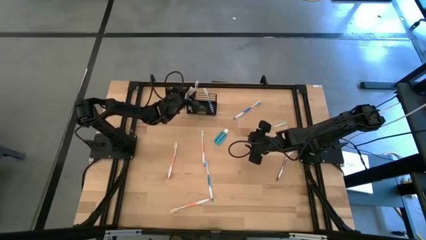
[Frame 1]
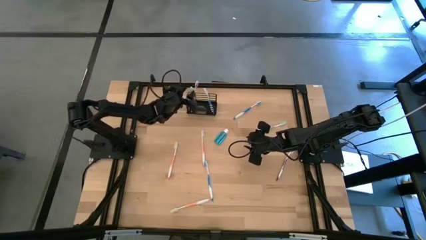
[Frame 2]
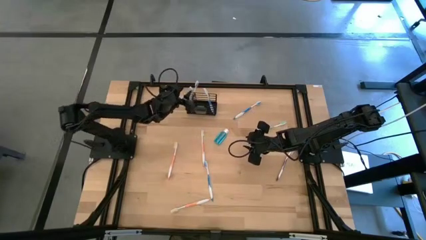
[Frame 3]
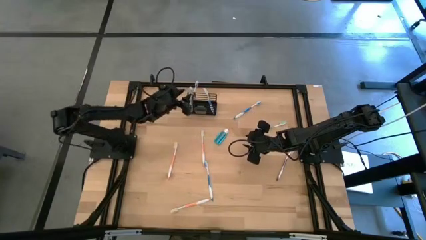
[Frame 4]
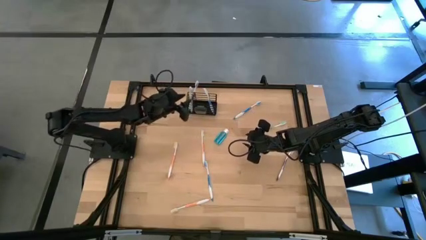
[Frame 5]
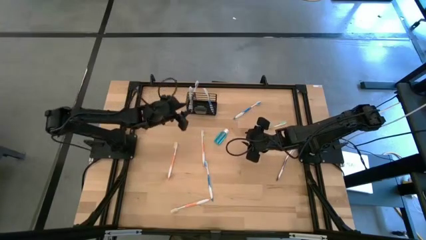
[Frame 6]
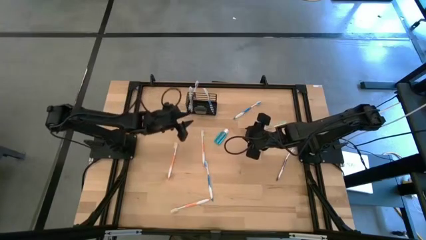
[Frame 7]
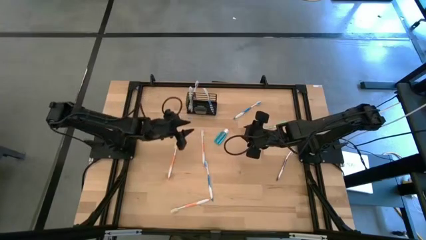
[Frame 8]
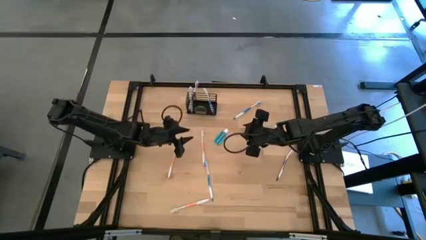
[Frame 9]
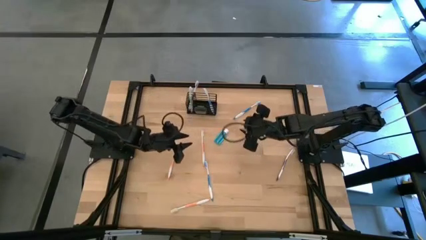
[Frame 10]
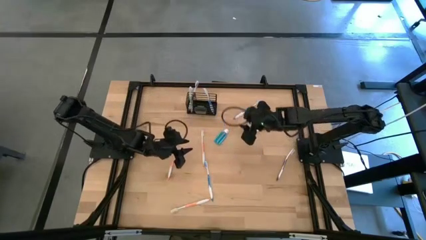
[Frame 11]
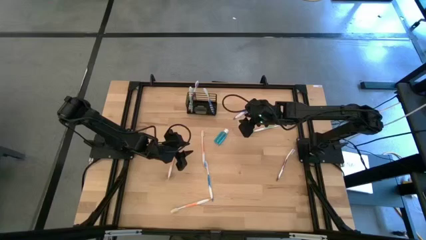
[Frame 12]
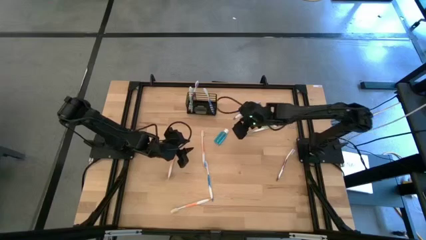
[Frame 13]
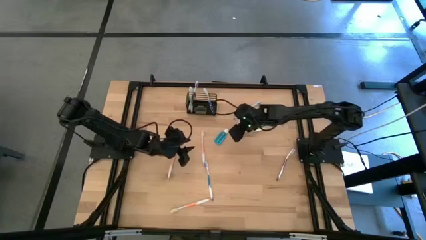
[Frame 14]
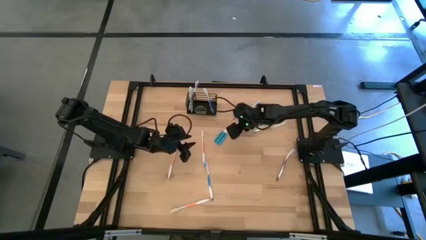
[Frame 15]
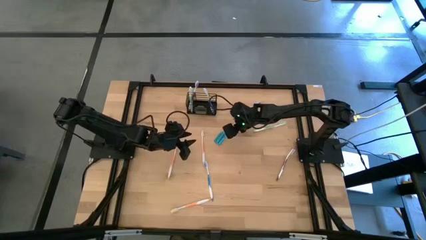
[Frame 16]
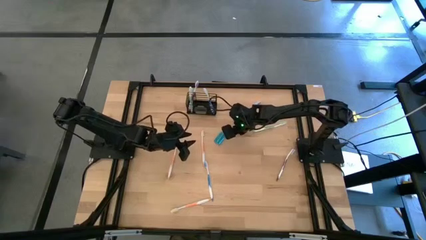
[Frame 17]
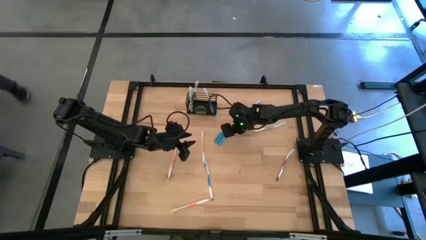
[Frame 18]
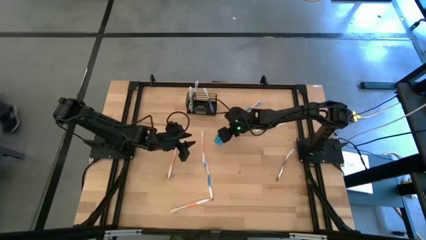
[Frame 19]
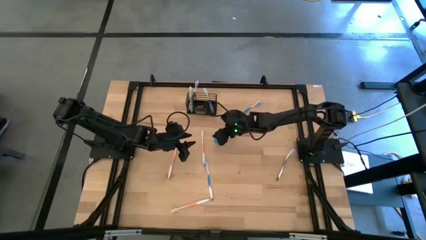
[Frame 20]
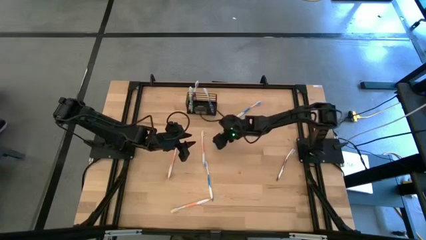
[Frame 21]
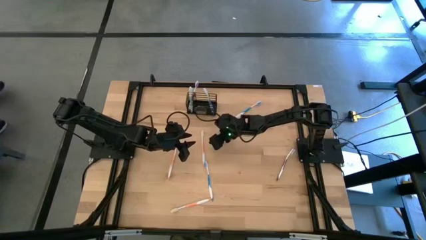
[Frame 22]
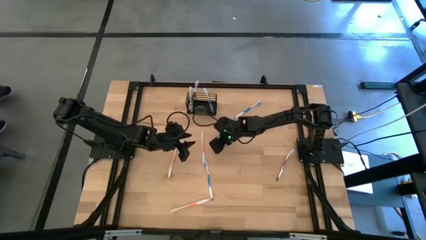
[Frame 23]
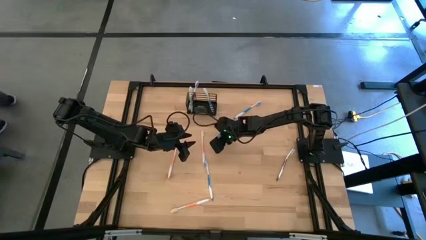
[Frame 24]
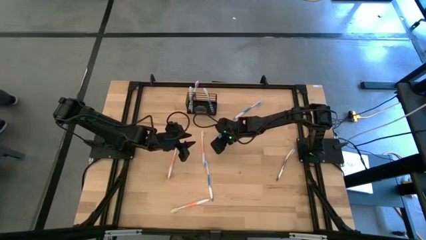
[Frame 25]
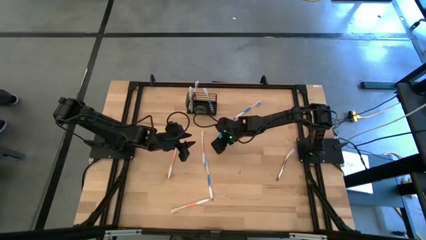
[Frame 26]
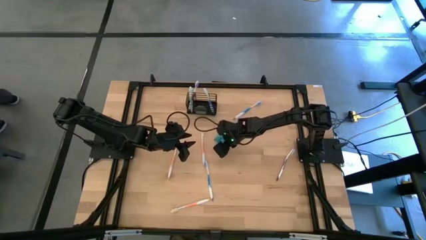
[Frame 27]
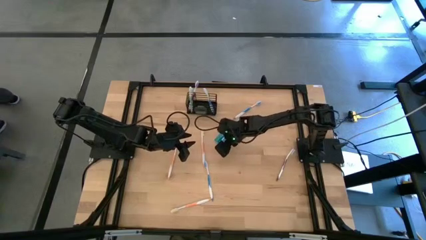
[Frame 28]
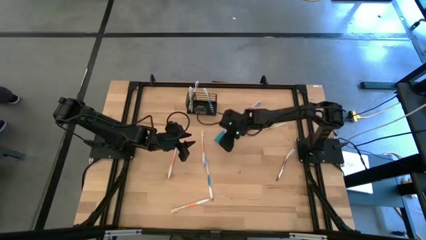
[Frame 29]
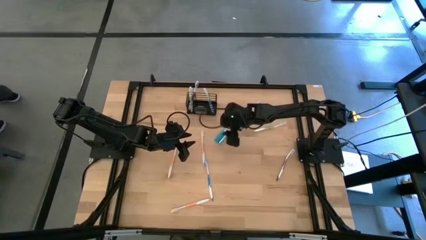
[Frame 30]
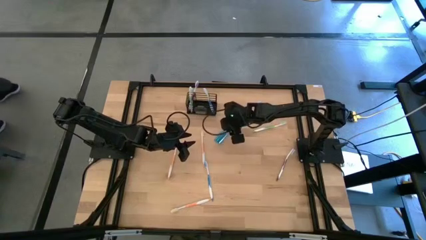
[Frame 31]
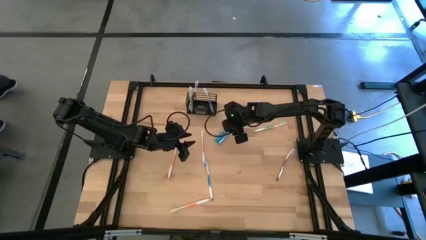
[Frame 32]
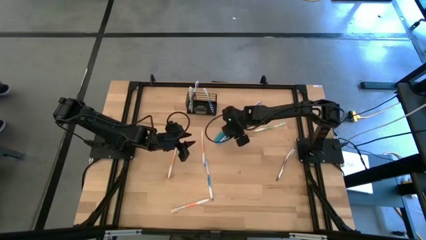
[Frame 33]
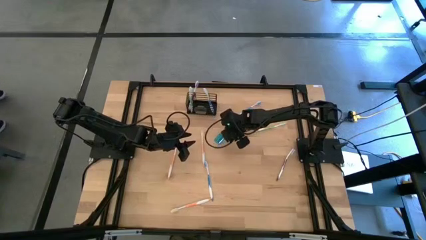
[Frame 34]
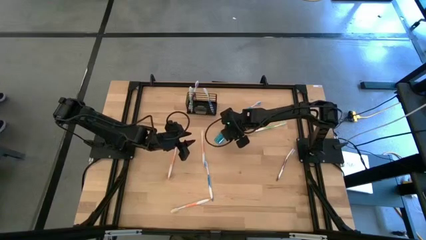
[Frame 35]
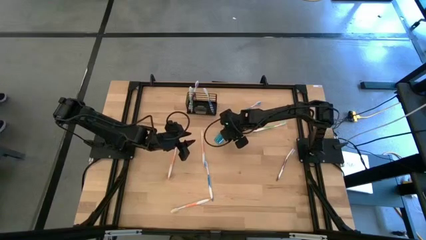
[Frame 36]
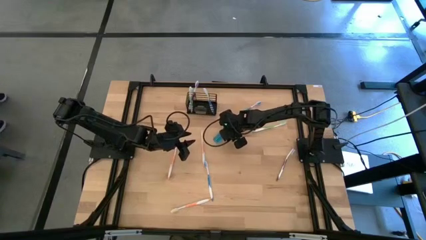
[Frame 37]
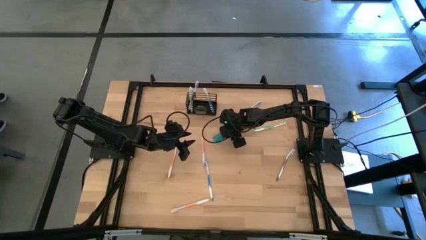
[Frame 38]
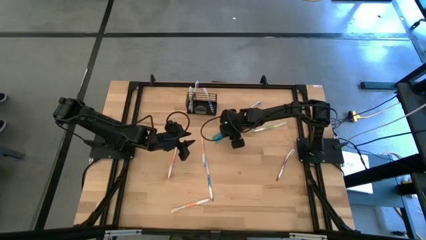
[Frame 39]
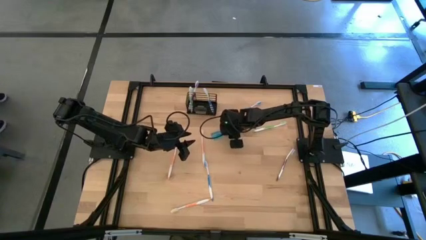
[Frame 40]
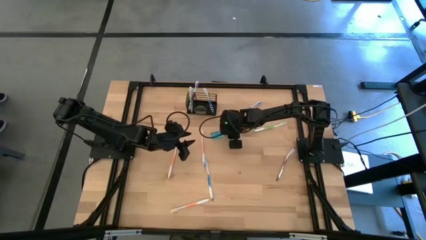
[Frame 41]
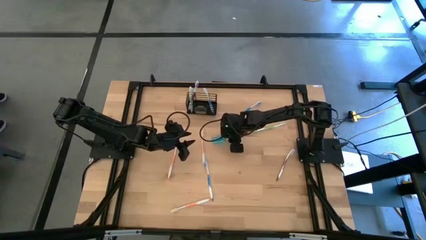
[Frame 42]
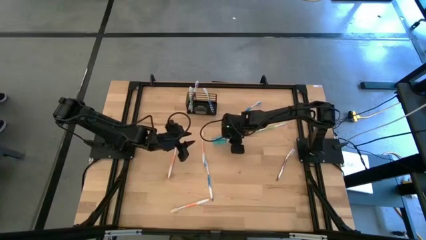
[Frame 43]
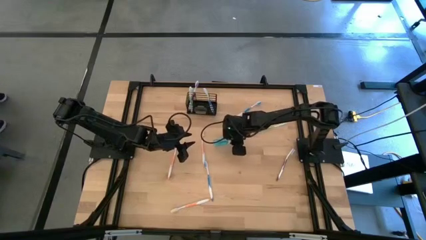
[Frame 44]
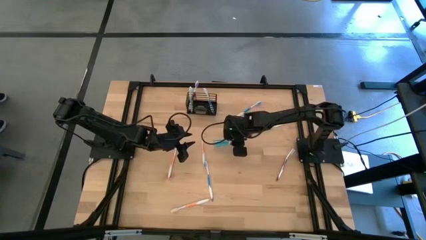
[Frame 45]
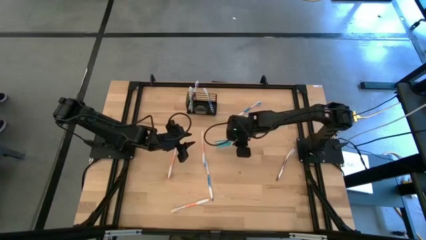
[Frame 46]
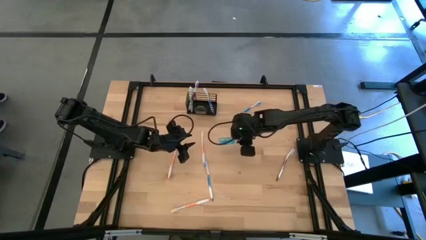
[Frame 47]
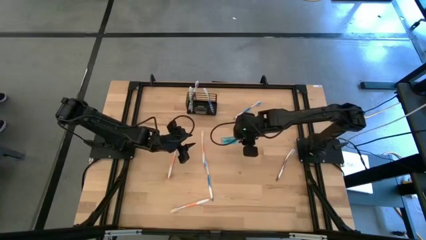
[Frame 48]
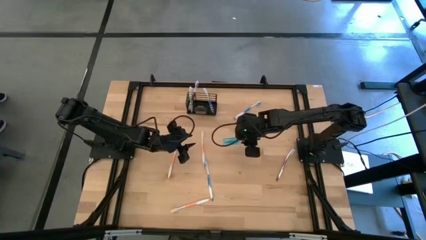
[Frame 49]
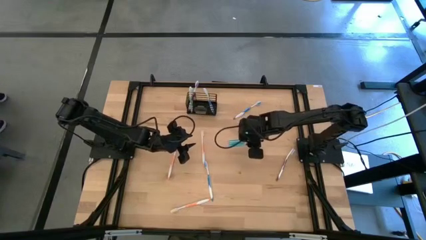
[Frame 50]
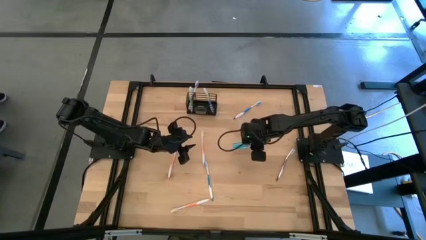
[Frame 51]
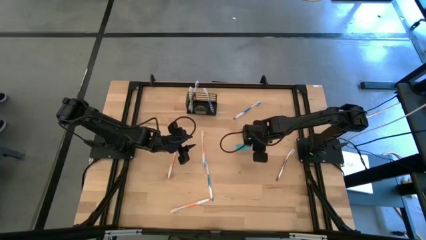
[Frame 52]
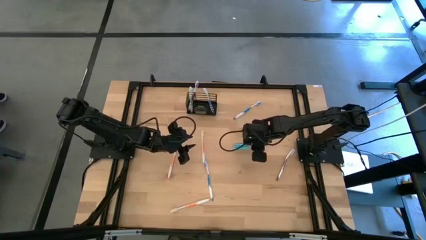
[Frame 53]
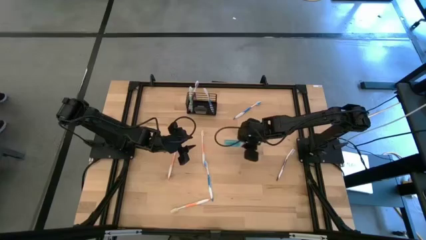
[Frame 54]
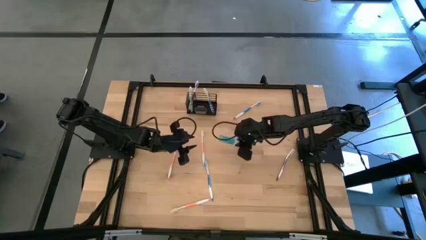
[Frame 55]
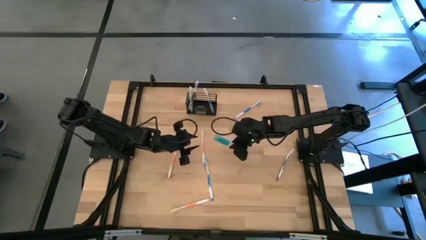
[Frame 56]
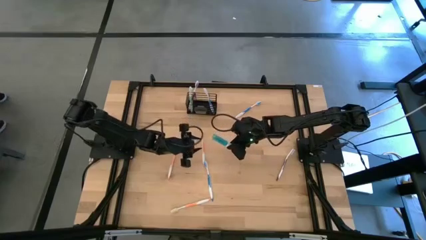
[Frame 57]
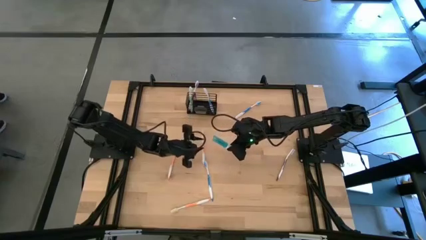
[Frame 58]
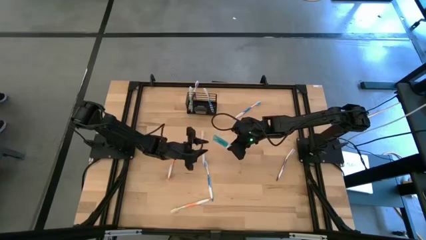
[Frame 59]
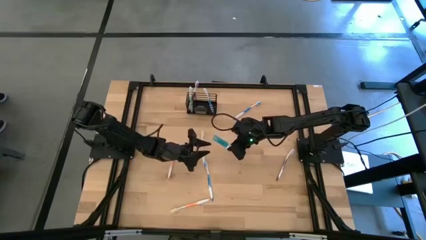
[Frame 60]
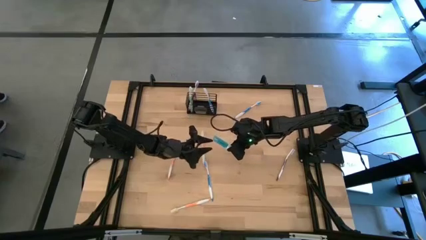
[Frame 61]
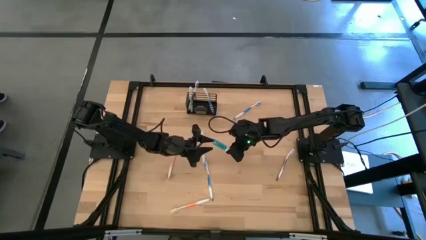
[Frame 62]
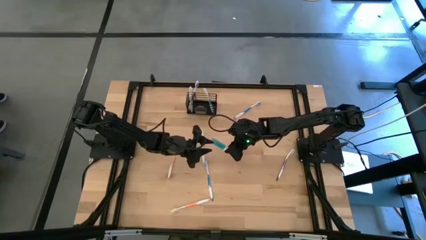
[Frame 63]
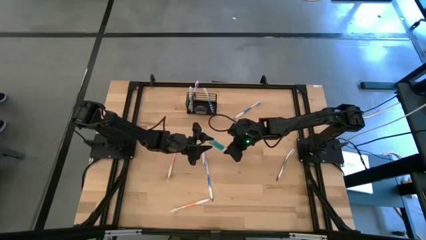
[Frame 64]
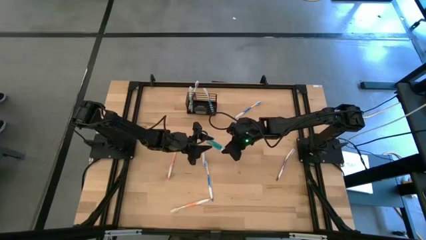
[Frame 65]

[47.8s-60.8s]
Task: Pick & Place toothbrushing station
Put the blue mouthwash bottle into the black wire organizer
